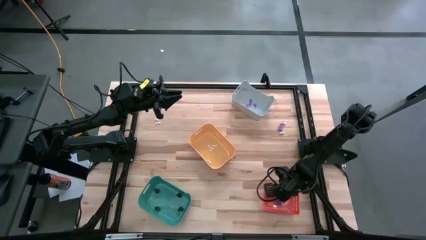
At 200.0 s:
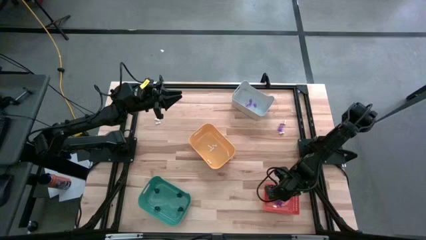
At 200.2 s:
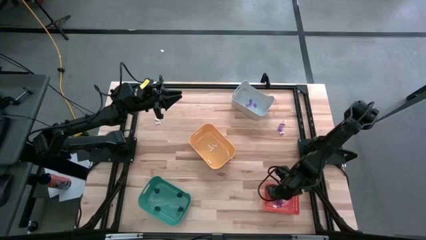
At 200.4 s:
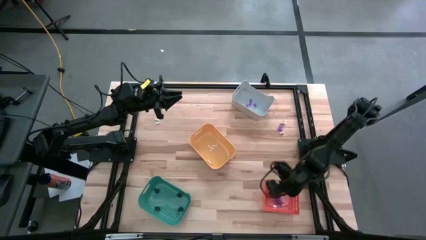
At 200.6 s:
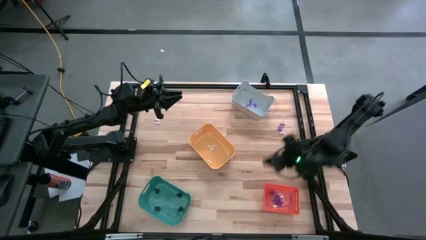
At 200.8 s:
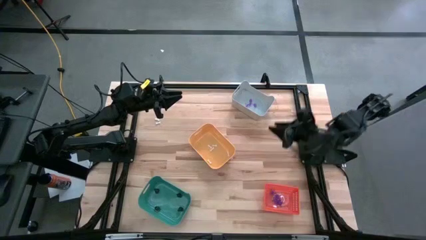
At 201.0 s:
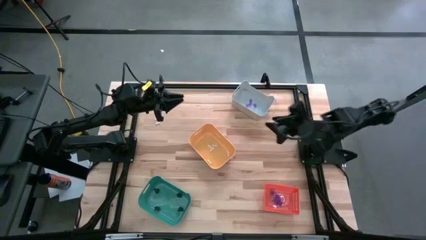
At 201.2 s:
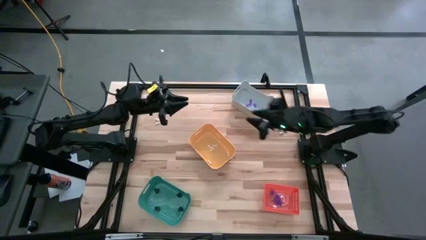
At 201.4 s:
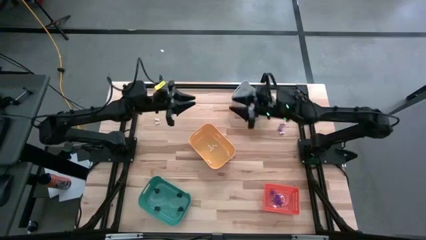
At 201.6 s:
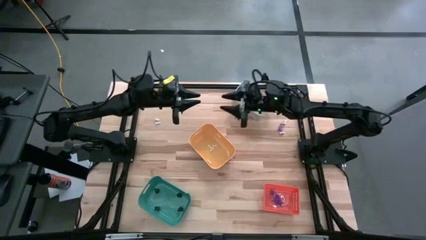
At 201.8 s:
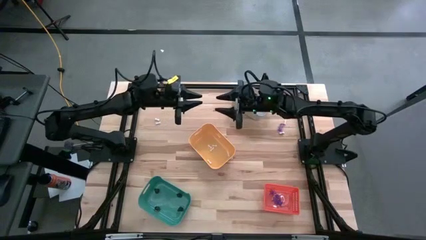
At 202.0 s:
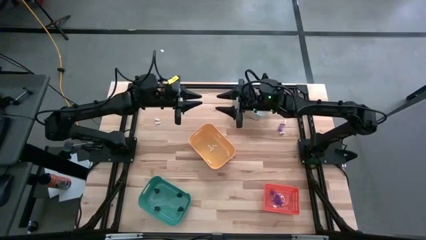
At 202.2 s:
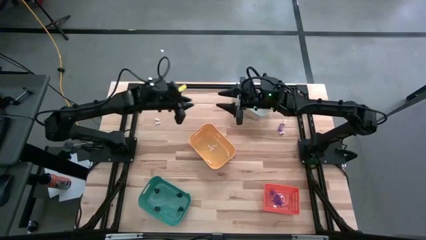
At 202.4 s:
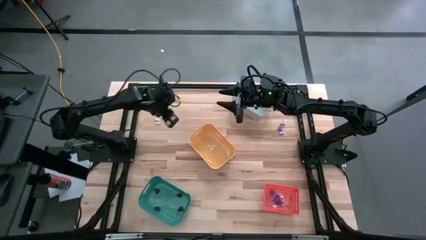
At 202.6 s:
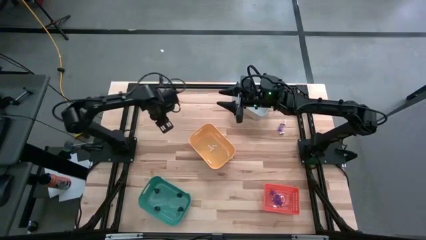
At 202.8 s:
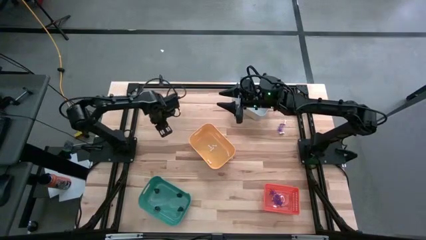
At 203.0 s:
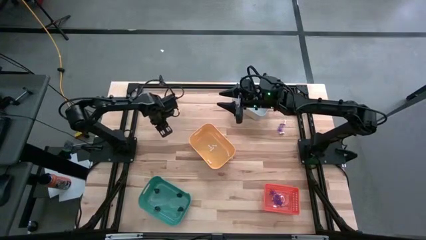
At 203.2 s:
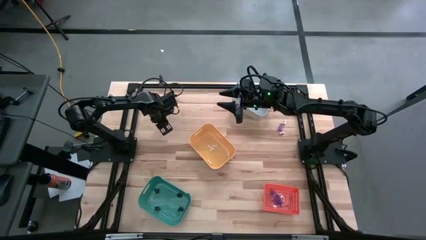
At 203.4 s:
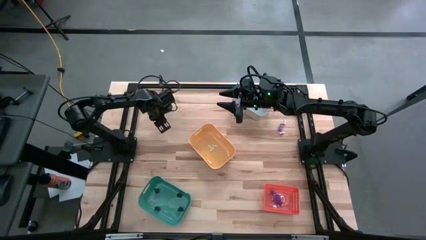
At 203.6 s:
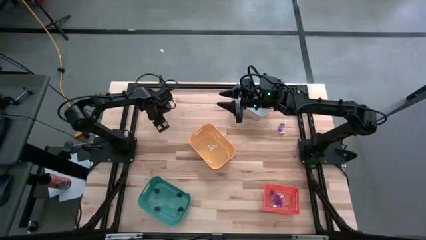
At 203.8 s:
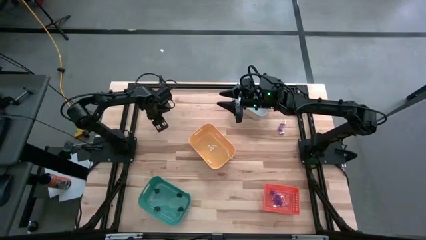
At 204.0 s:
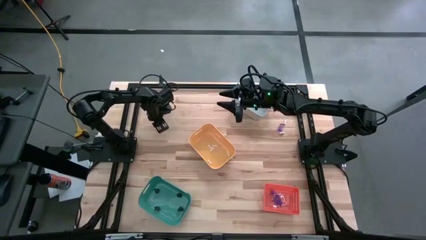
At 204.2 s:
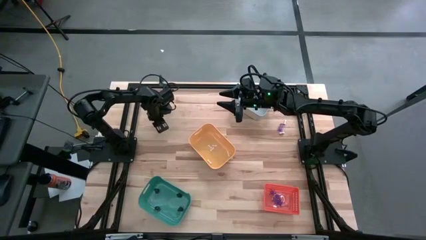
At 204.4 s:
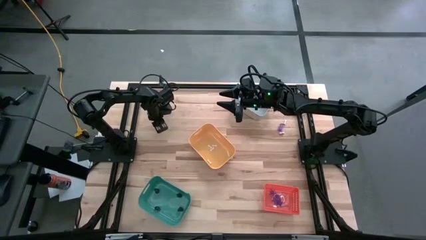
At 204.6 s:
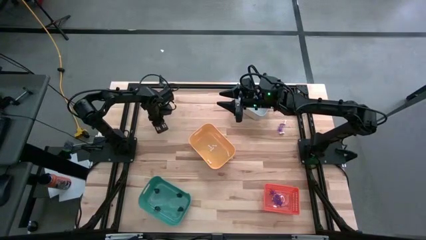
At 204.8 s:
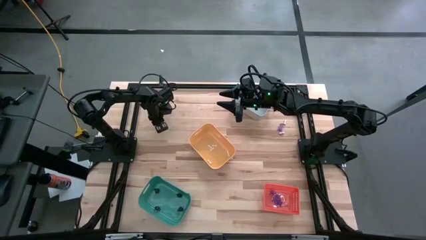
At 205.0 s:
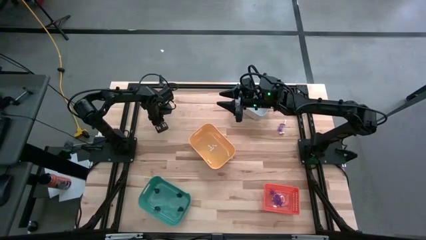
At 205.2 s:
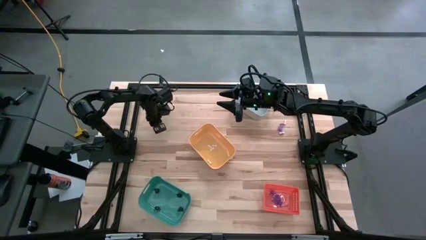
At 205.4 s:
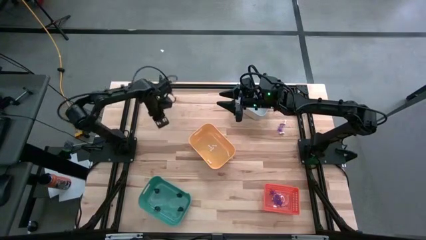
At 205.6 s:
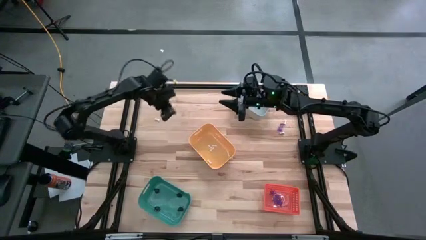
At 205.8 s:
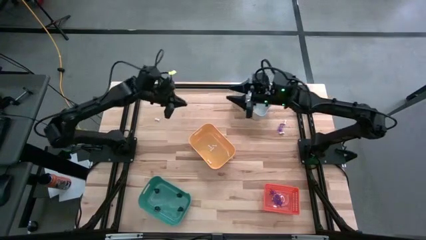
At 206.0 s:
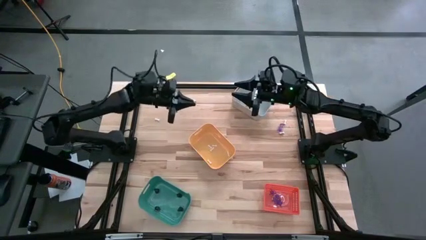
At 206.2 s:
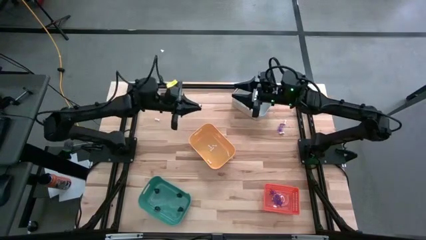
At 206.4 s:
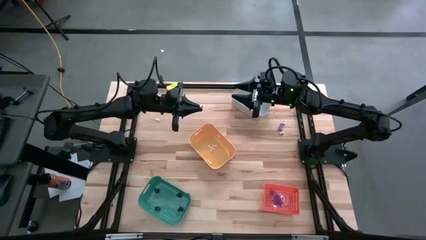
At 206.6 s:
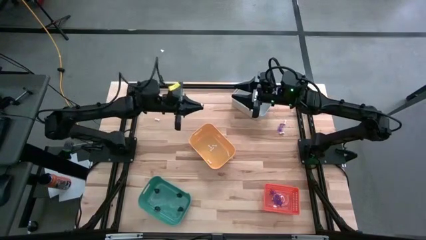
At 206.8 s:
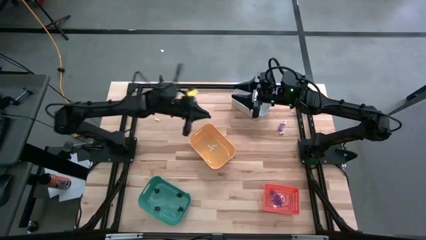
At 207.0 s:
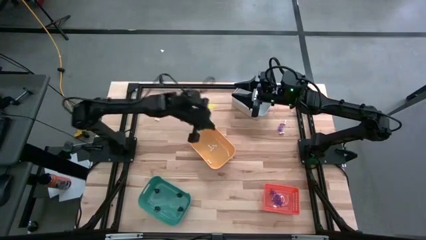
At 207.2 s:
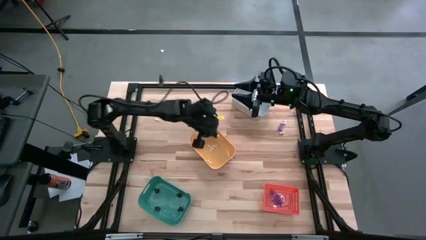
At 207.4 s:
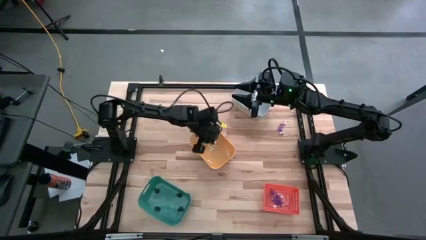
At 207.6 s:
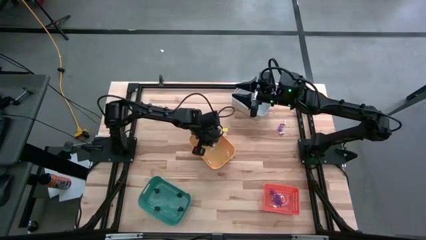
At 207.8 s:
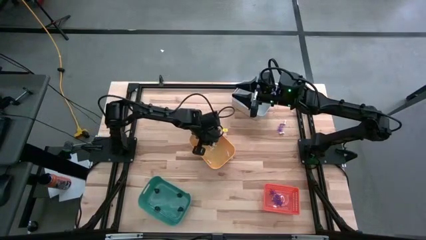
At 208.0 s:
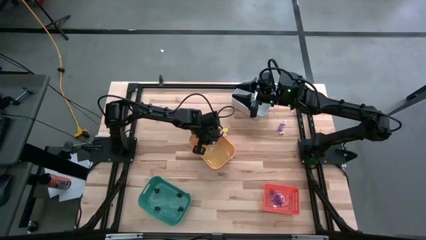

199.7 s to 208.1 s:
Task: Sort Halloween decoration
Put the white bone toy into the yellow bin

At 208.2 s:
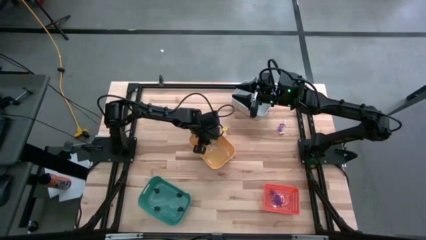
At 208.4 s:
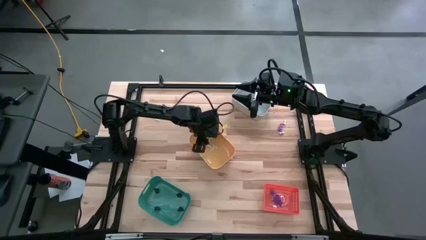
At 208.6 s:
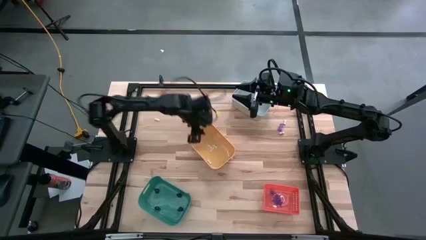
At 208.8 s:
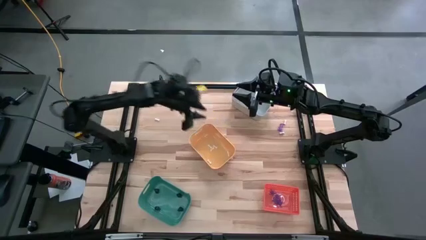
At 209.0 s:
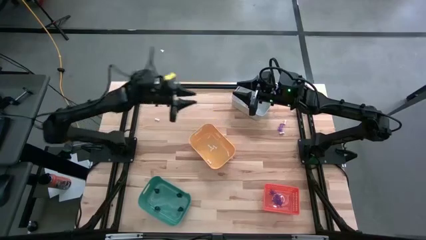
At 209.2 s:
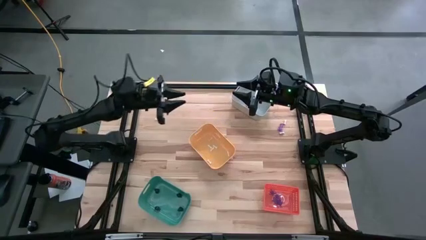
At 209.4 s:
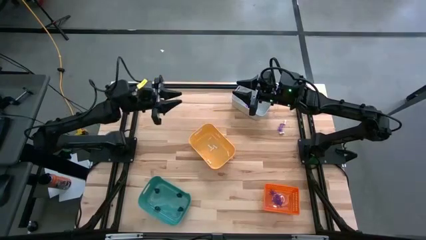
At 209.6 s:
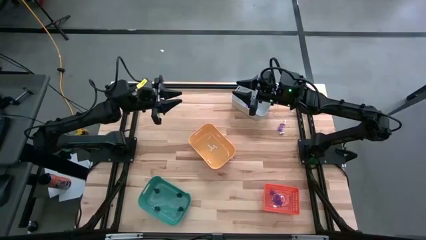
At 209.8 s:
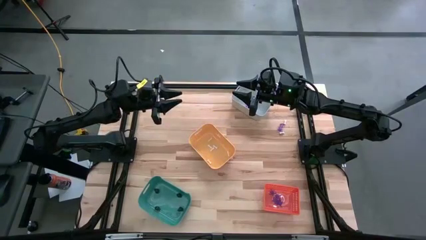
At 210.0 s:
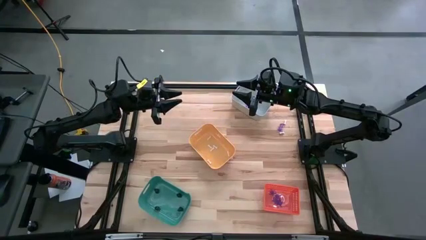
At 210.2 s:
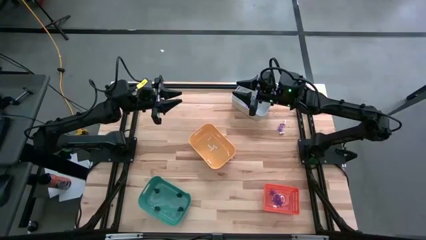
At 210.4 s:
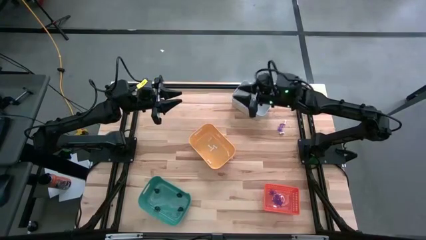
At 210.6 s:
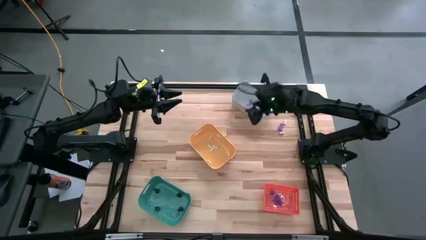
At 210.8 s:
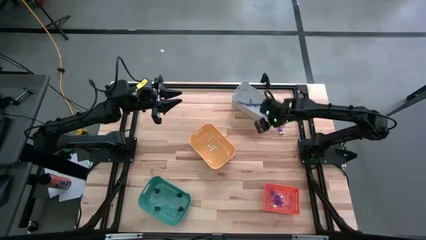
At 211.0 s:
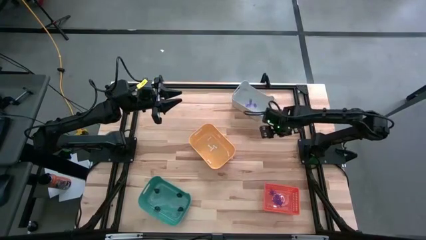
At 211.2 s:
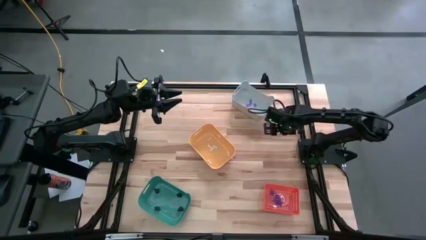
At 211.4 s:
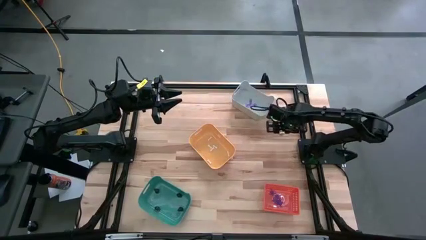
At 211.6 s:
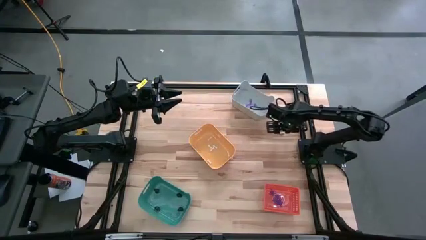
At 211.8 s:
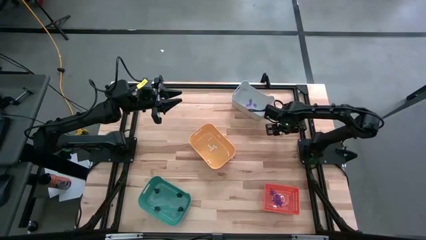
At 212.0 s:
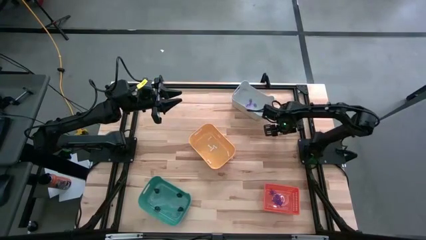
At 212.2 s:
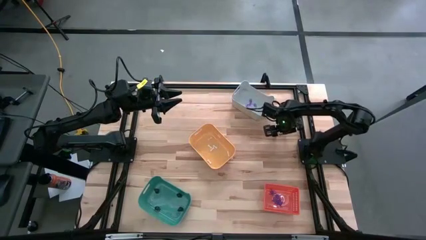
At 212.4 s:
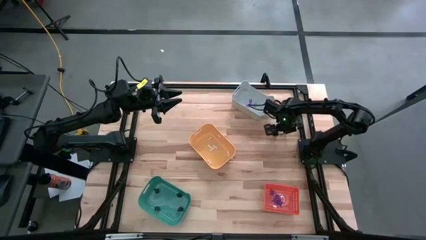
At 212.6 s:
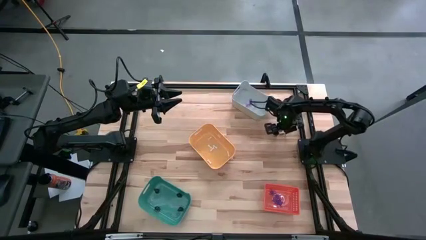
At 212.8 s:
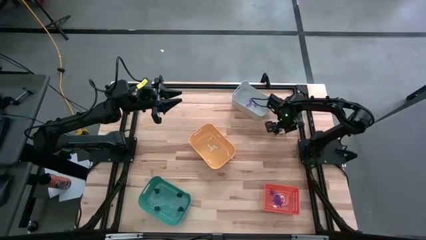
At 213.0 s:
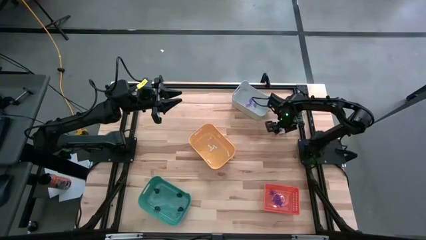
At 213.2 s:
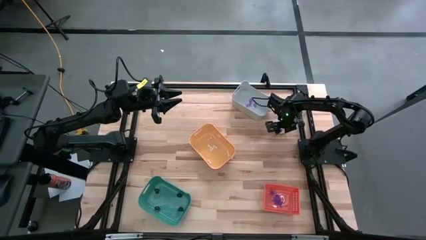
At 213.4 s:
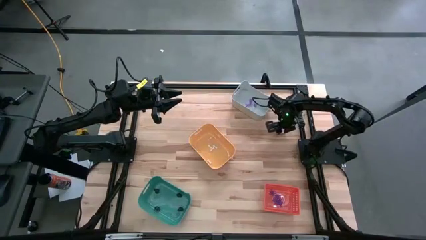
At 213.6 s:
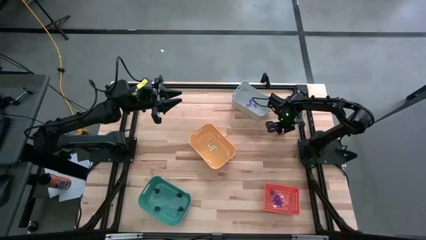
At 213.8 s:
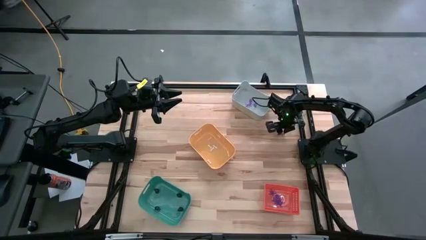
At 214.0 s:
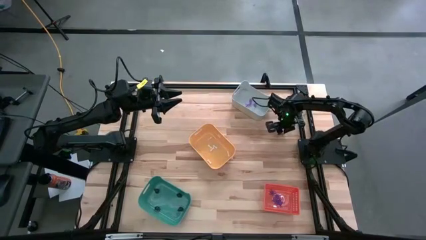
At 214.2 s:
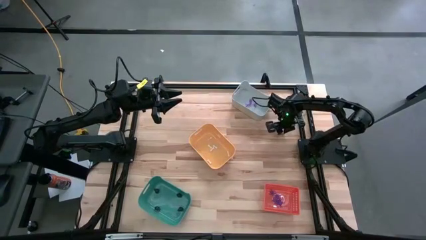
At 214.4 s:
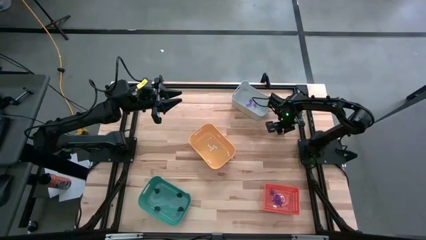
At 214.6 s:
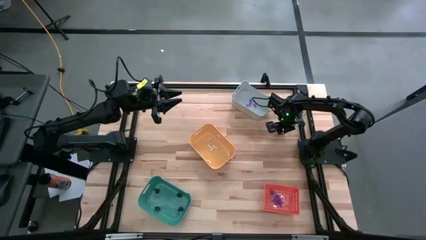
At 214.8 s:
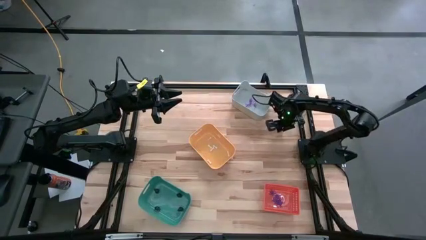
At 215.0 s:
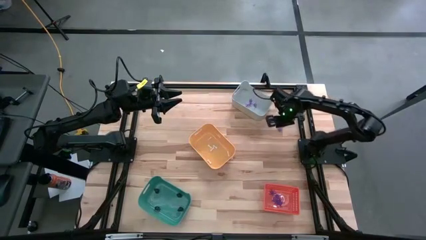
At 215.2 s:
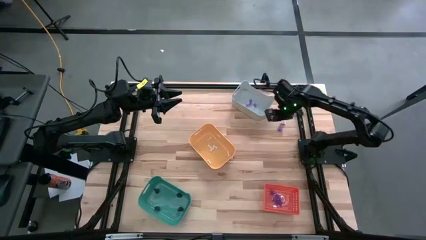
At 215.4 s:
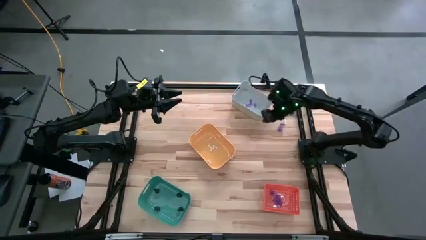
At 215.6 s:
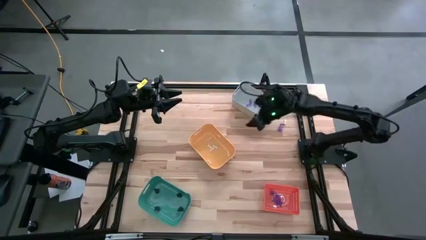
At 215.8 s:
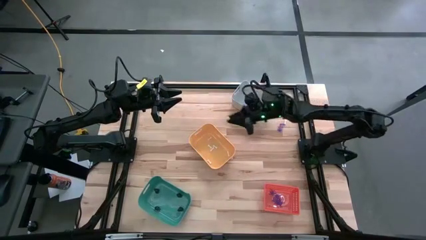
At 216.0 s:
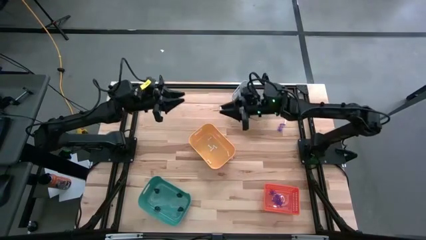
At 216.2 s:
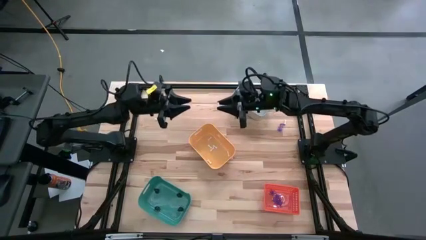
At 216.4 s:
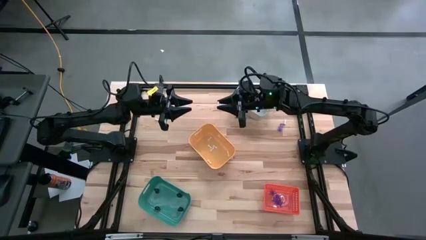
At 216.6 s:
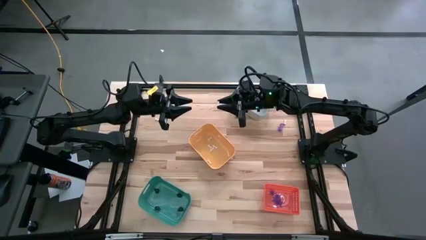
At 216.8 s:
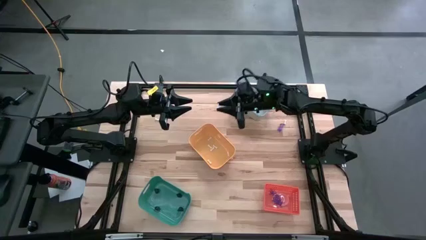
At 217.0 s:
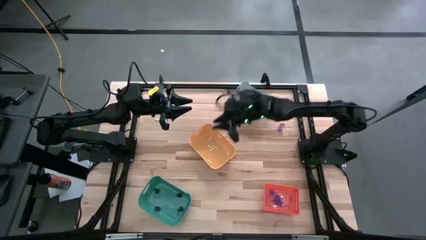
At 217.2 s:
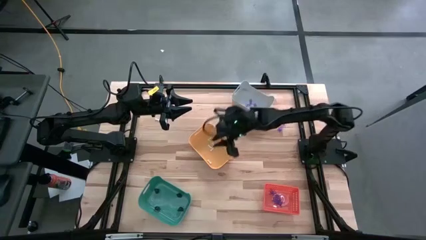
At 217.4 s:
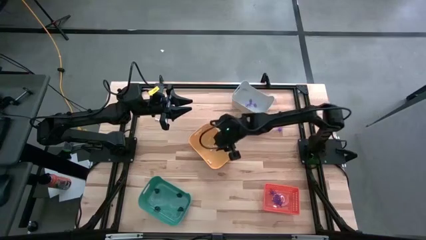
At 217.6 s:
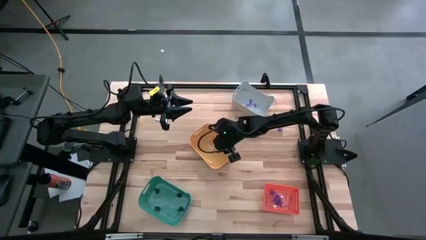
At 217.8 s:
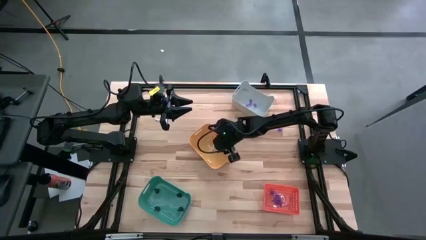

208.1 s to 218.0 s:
Put the white bone toy into the yellow bin
